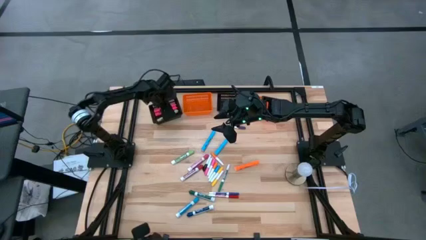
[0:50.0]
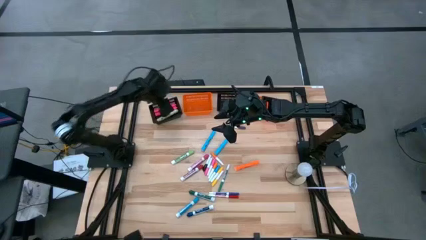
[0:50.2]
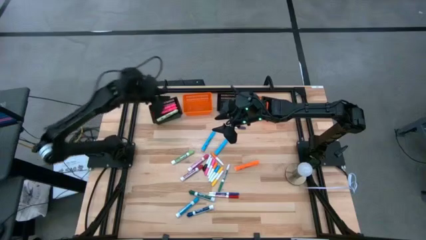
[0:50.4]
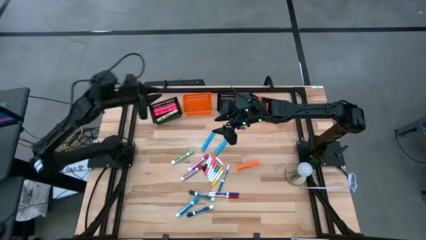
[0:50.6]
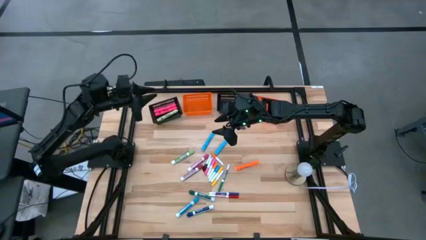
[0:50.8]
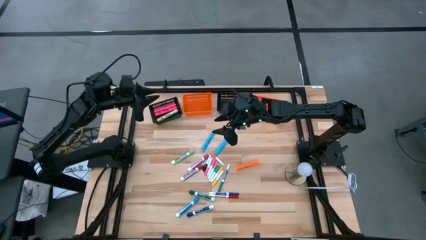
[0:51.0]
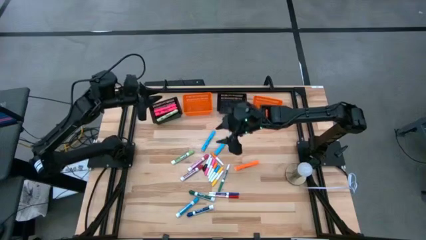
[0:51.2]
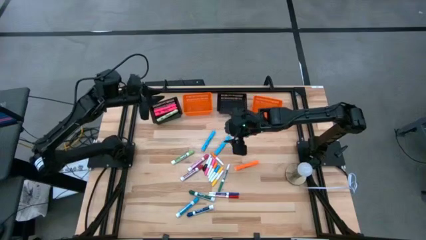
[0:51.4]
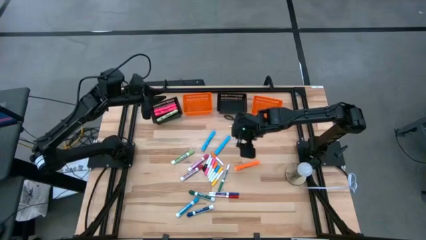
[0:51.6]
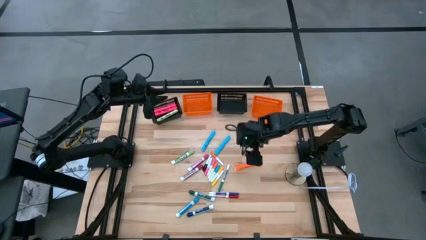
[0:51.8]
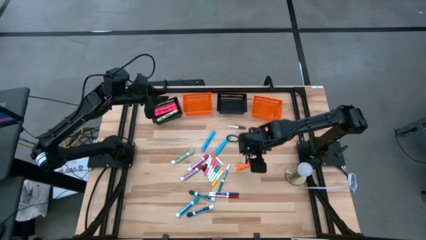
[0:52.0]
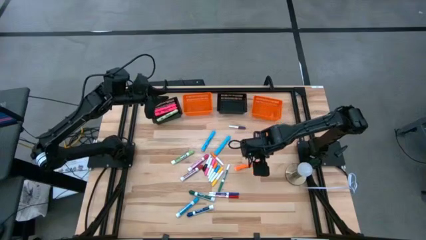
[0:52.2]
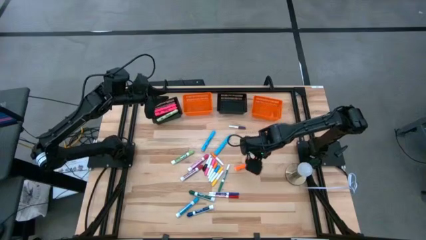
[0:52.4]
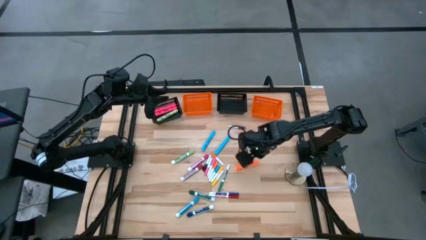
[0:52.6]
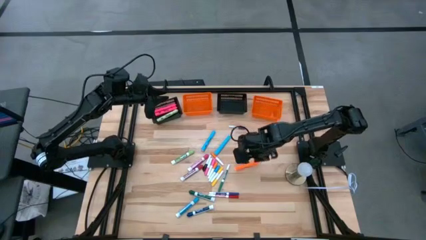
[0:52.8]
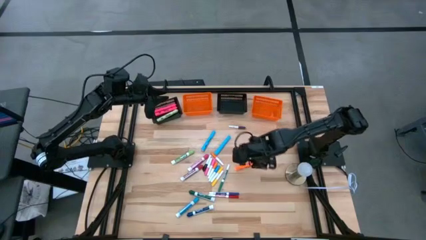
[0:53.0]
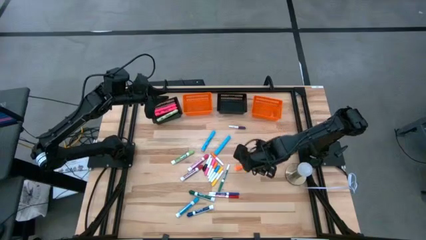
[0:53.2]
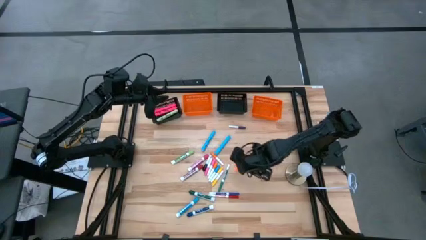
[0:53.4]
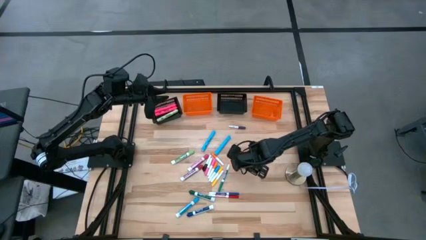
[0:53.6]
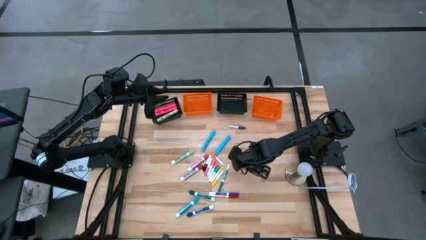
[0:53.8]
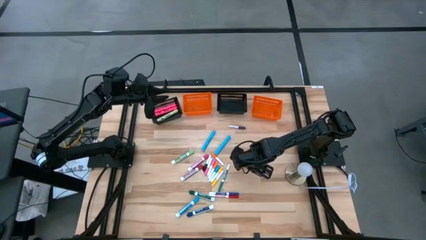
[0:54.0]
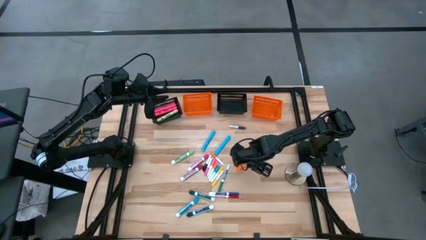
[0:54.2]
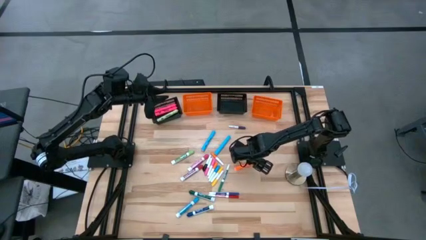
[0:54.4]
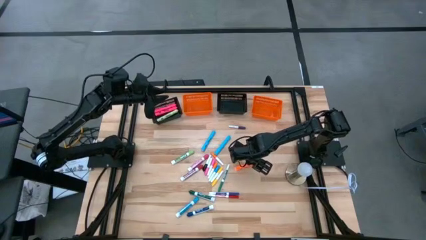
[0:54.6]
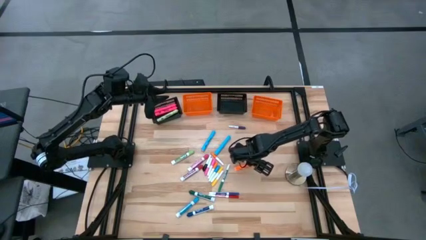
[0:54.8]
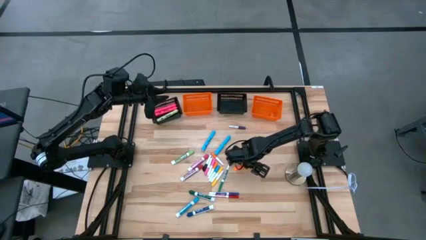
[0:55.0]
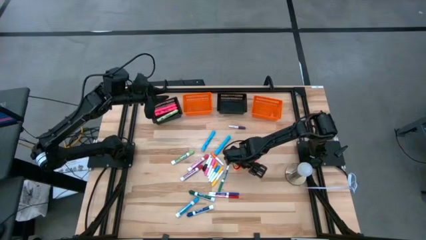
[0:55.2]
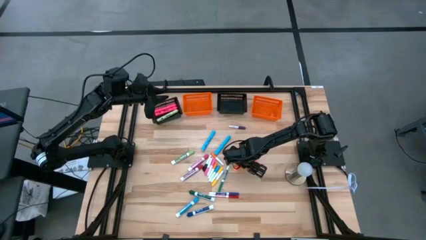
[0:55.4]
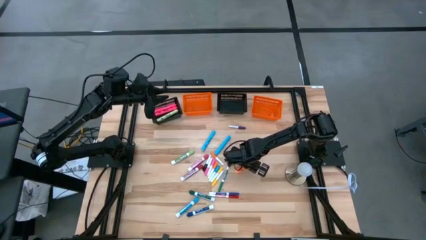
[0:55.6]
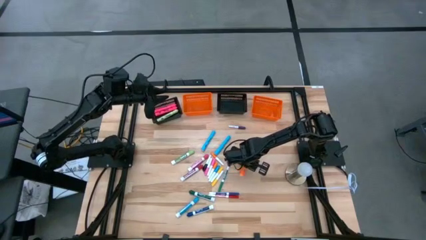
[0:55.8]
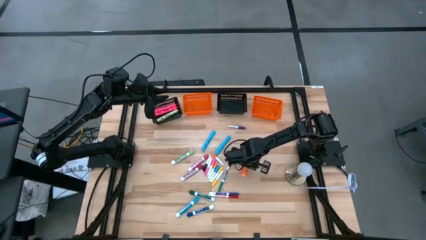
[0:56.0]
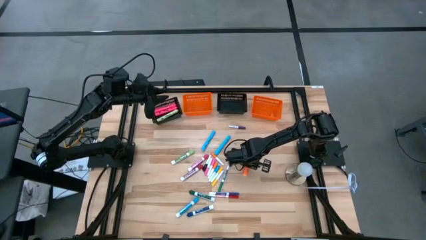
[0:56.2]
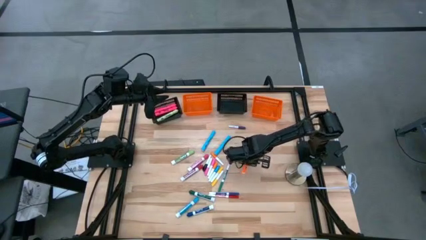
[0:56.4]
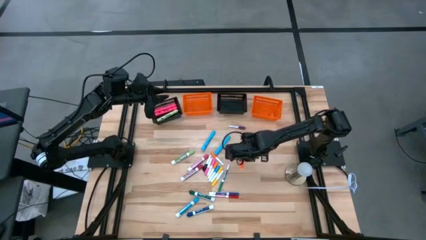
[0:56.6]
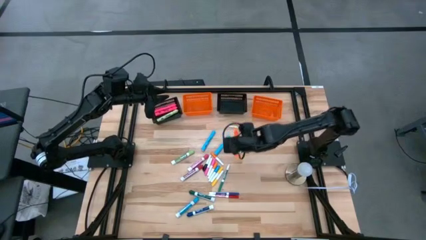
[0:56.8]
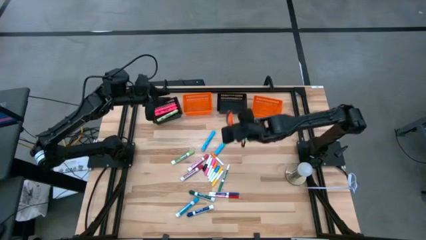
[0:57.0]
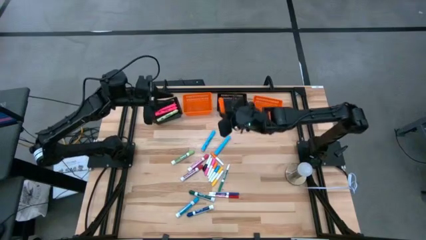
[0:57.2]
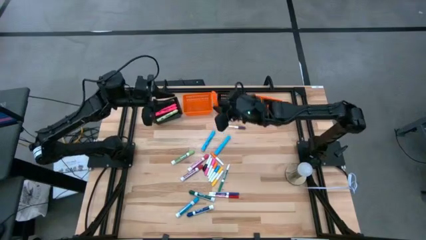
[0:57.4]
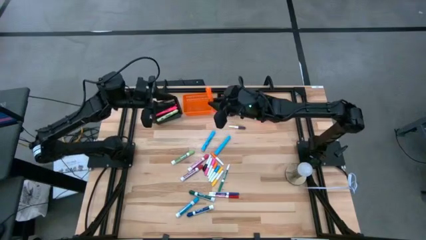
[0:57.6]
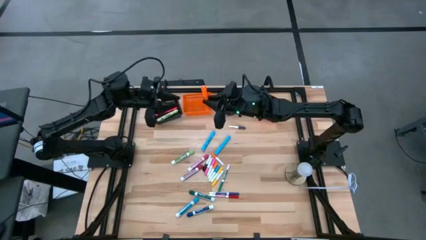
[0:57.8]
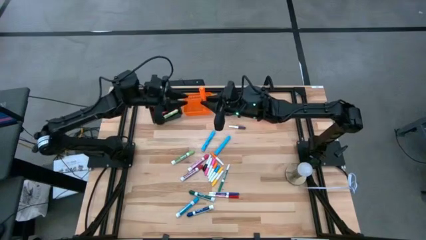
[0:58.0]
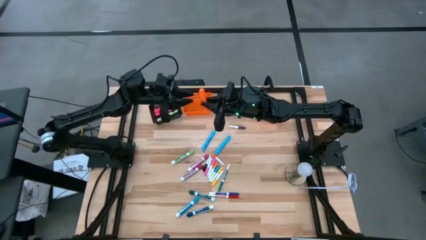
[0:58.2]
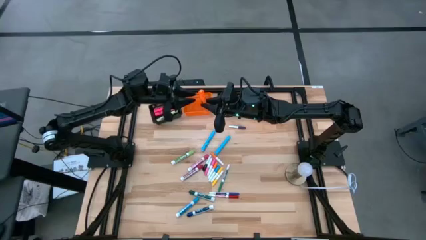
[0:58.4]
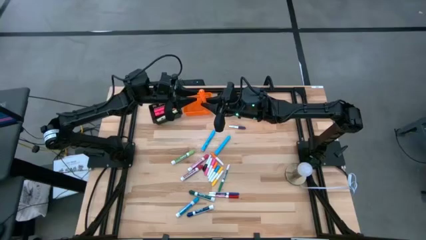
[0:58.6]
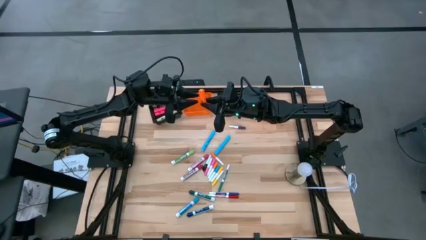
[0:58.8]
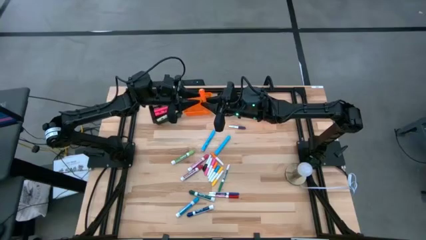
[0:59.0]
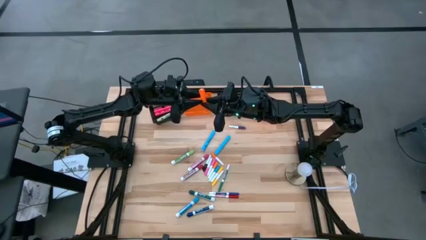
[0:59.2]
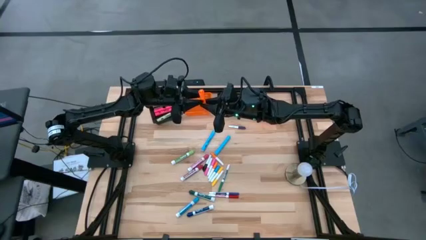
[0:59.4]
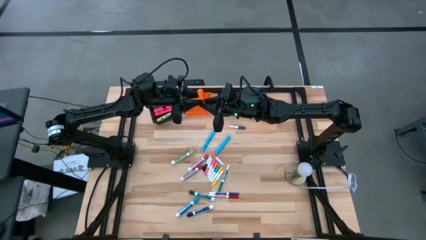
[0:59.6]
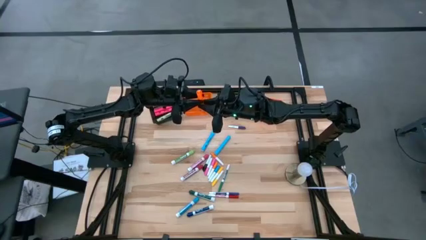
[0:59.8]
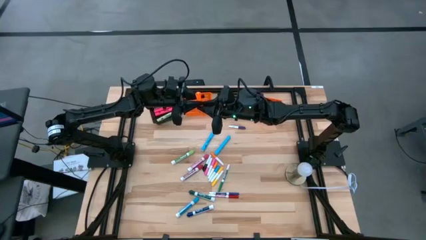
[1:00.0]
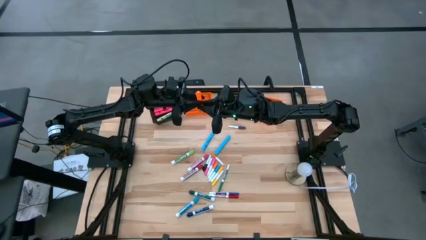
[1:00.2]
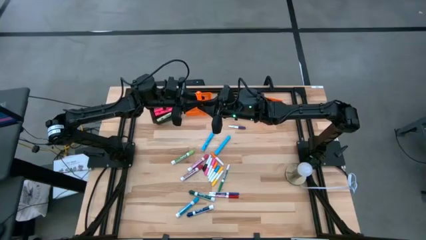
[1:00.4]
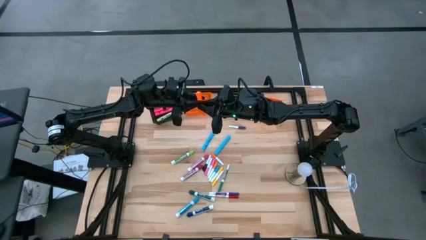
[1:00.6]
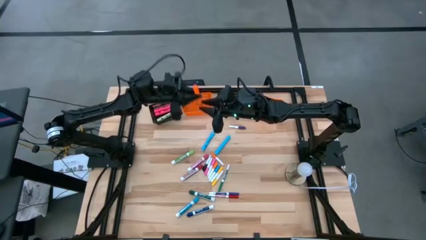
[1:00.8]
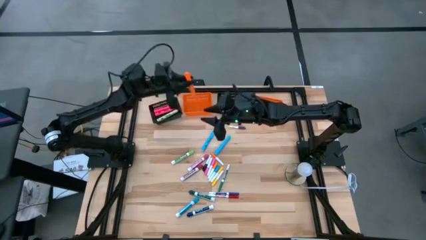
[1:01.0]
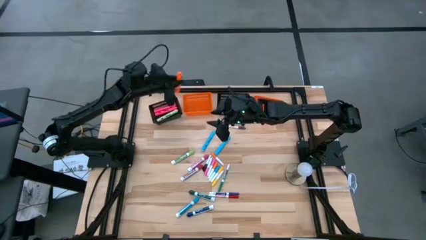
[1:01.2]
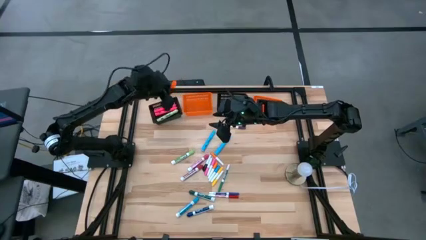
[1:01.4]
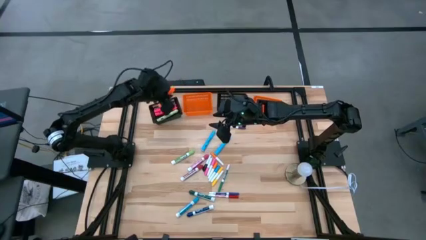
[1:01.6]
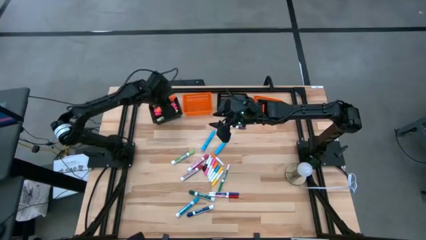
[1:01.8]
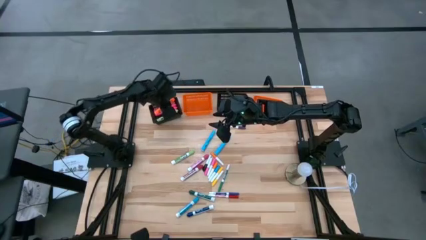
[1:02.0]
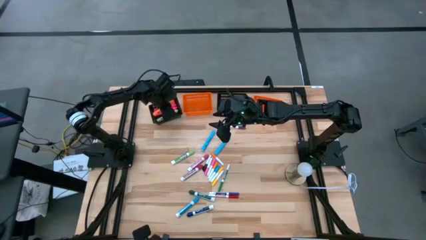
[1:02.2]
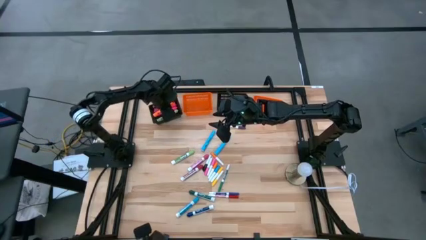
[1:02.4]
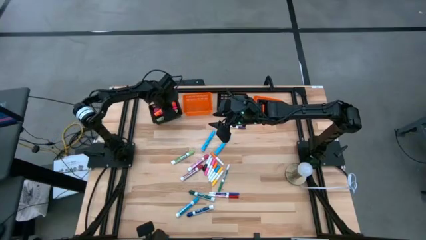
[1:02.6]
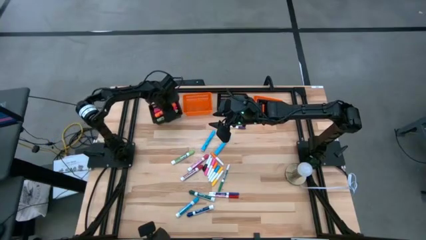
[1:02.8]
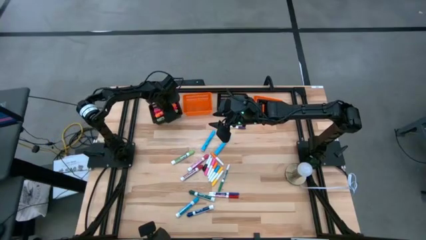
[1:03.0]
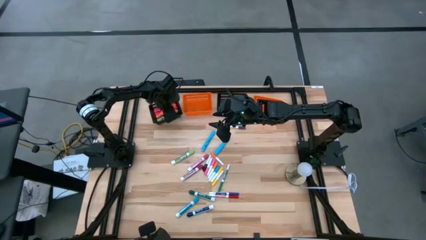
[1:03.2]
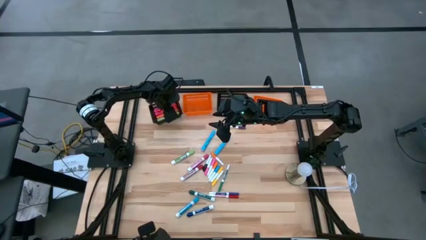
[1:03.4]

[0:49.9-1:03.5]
Task: Pick & Place Markers
Put the orange highlighter into the left black bin

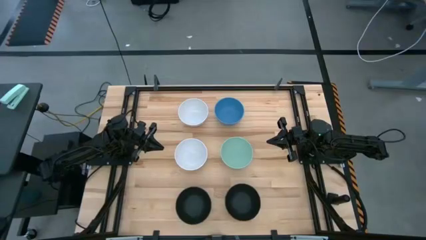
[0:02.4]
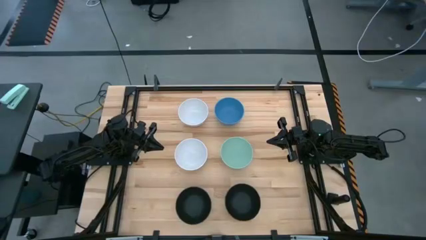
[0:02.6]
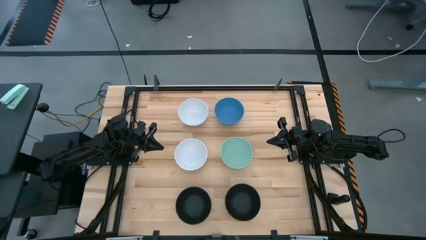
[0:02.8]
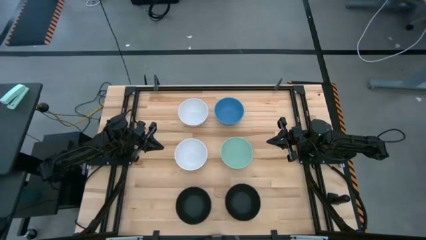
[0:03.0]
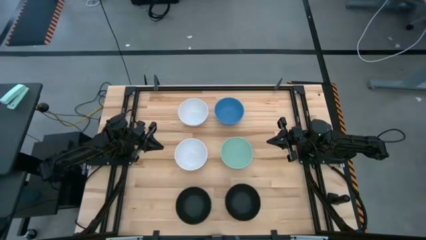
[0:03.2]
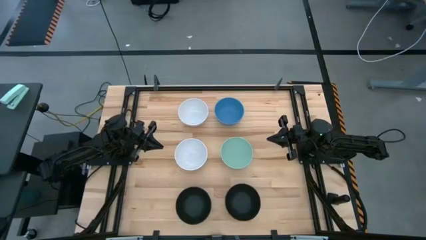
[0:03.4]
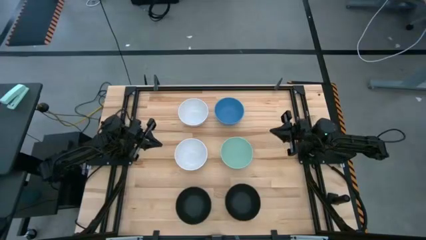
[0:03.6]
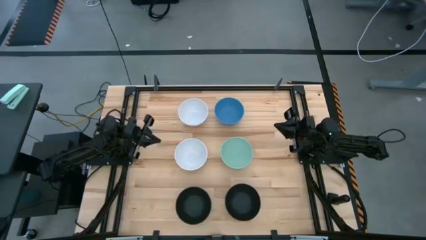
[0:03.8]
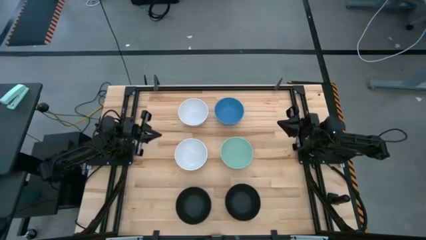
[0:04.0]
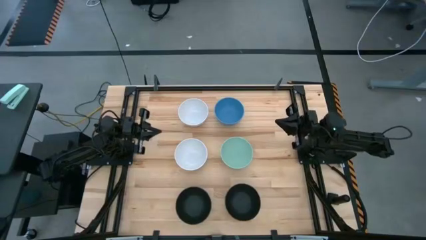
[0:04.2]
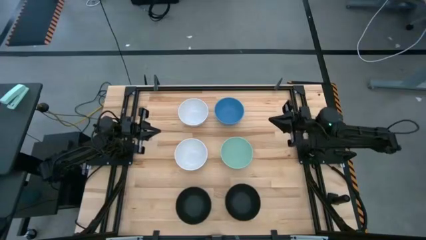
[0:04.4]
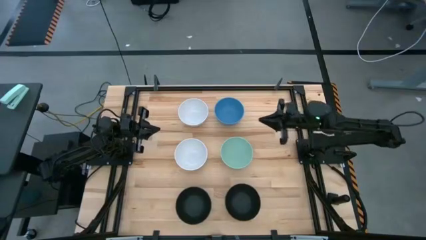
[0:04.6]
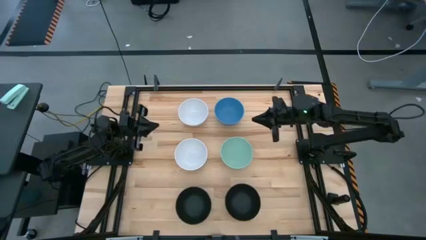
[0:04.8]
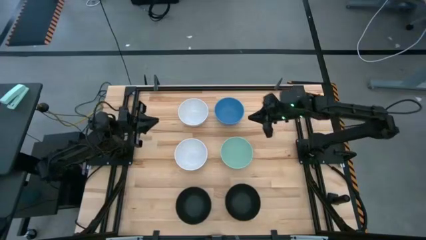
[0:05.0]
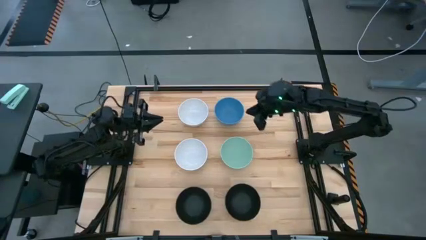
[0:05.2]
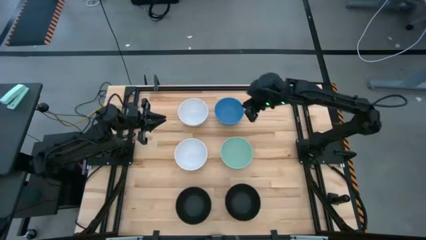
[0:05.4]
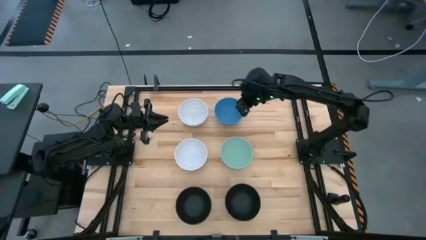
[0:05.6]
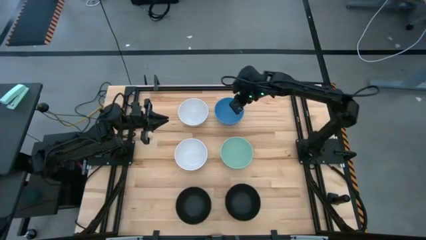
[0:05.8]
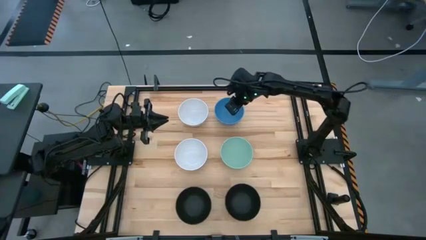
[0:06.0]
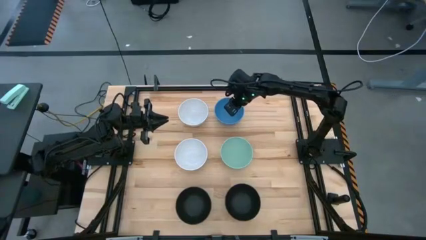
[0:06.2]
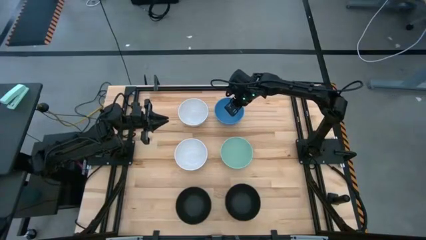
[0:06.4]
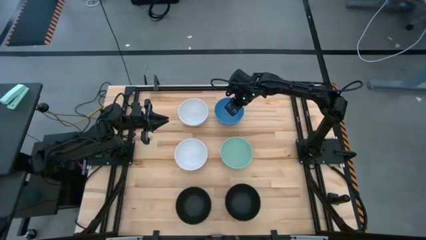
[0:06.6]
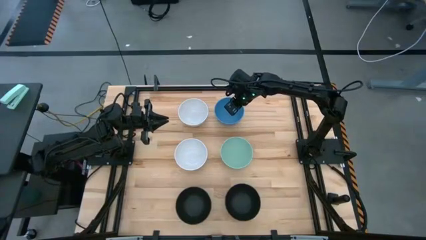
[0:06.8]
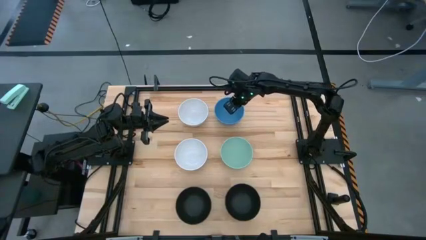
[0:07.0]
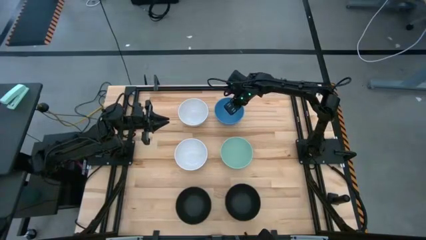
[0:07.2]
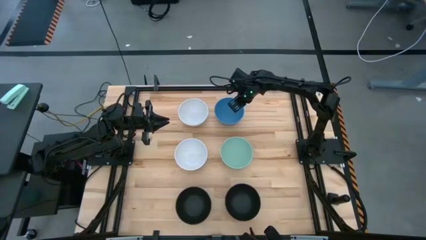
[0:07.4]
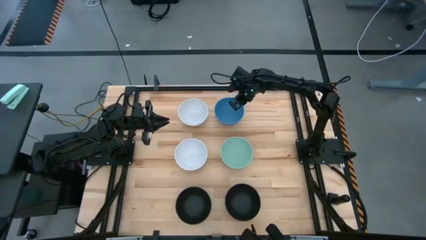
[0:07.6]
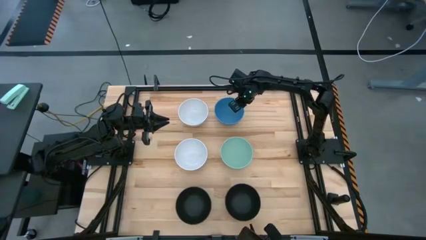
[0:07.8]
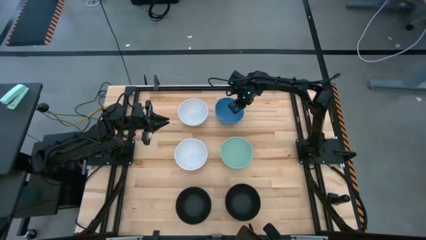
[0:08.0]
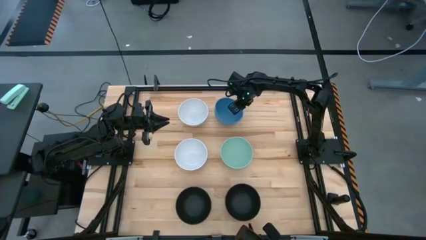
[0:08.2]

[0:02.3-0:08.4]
Task: Nest bowls inside each other
Stack the blue bowl on the green bowl
